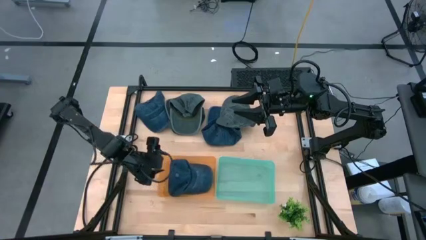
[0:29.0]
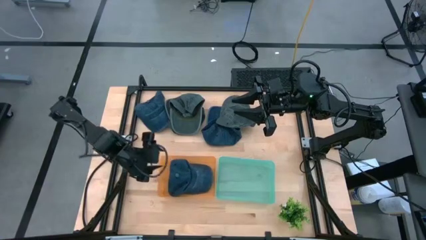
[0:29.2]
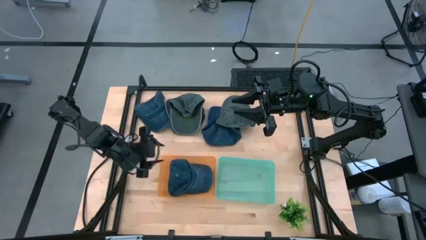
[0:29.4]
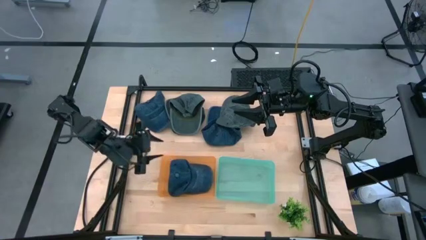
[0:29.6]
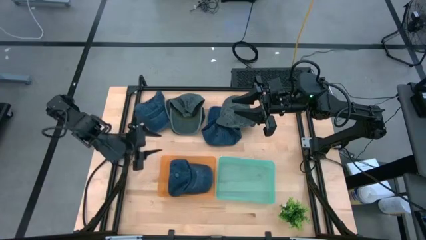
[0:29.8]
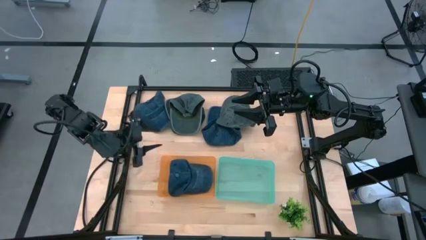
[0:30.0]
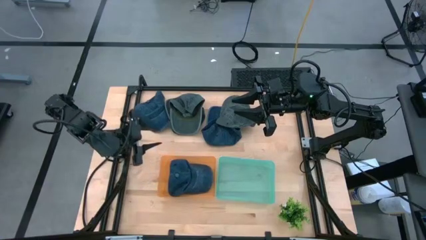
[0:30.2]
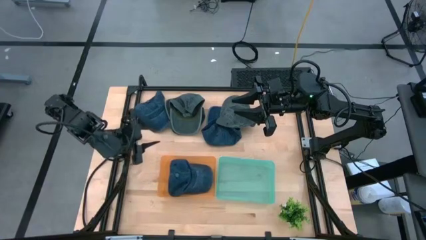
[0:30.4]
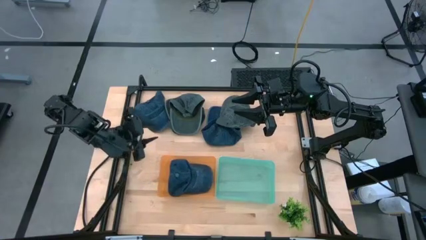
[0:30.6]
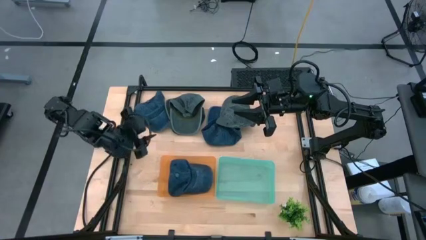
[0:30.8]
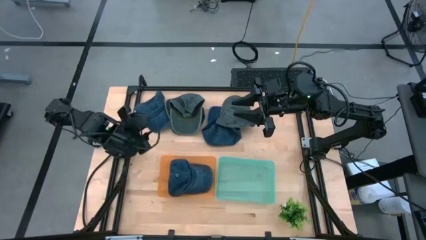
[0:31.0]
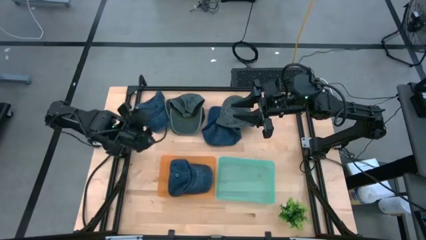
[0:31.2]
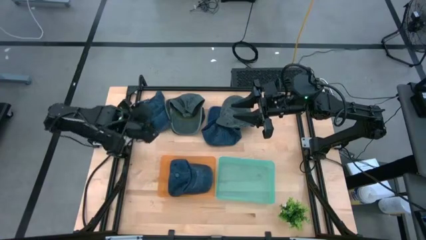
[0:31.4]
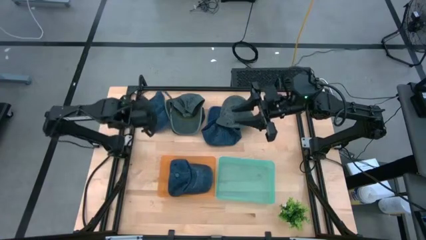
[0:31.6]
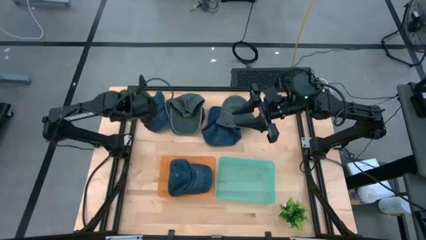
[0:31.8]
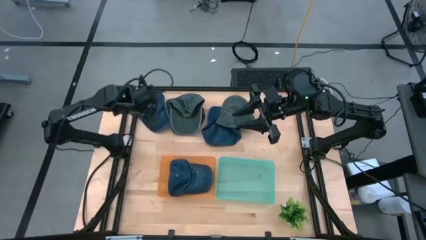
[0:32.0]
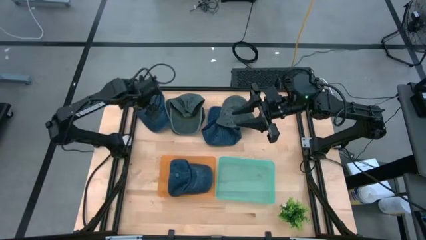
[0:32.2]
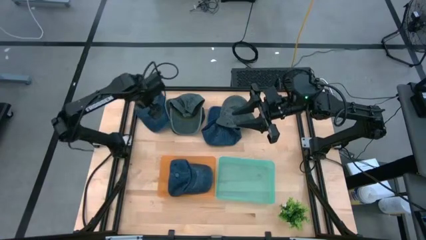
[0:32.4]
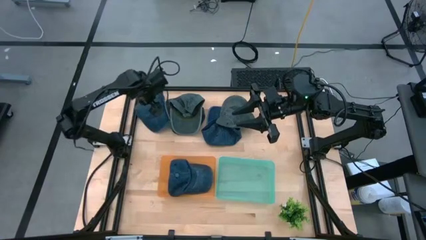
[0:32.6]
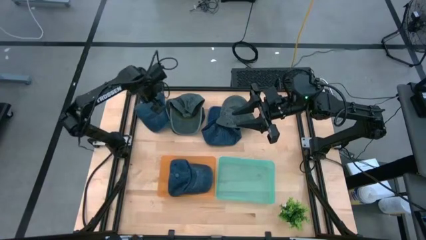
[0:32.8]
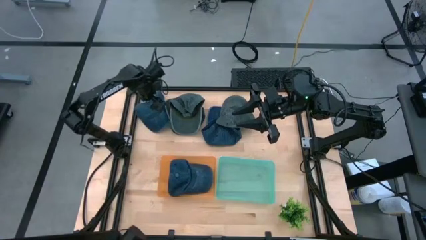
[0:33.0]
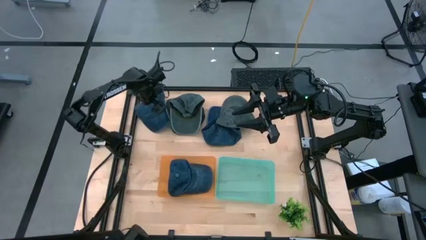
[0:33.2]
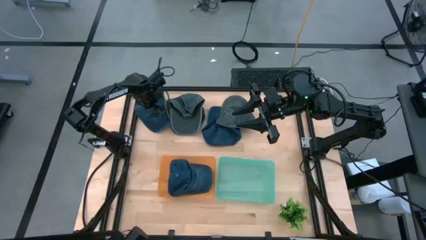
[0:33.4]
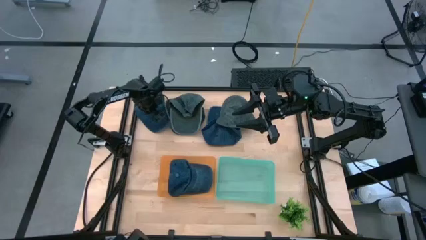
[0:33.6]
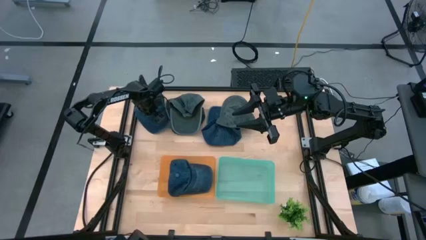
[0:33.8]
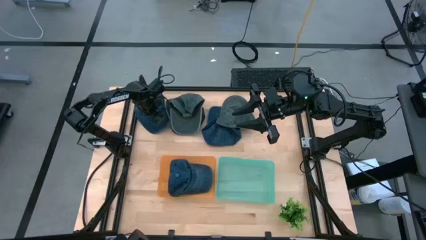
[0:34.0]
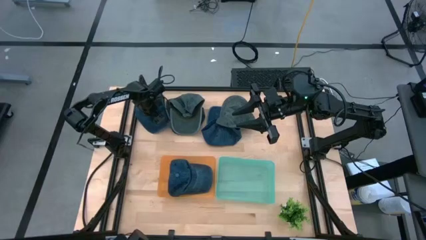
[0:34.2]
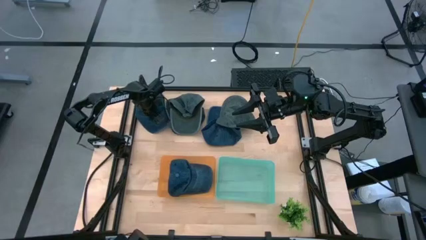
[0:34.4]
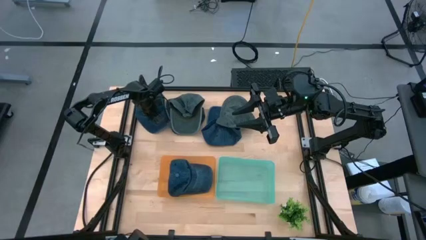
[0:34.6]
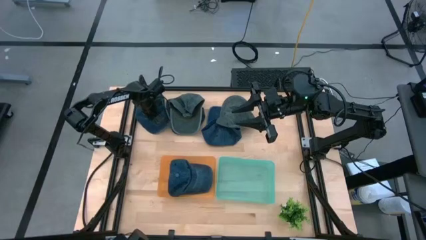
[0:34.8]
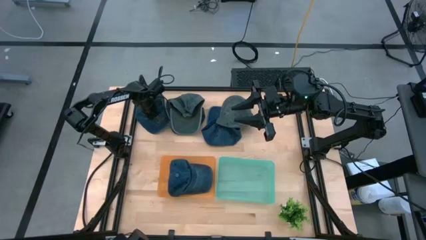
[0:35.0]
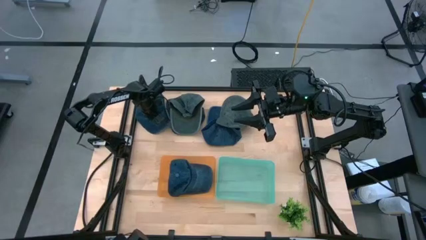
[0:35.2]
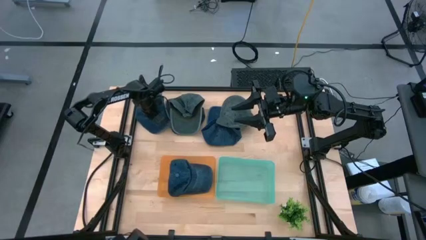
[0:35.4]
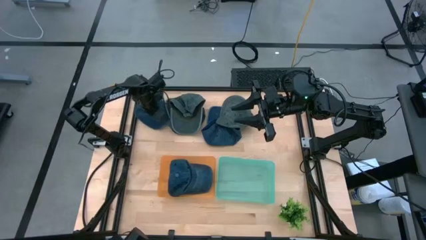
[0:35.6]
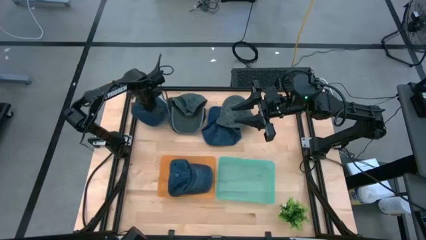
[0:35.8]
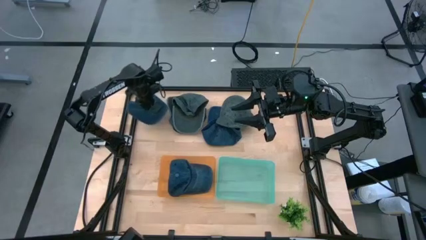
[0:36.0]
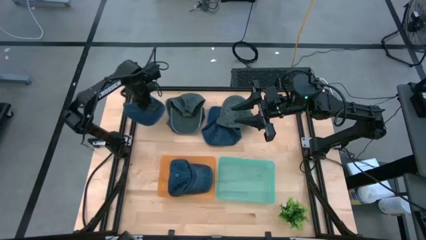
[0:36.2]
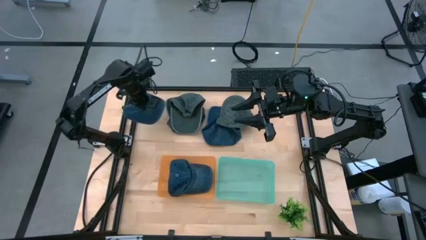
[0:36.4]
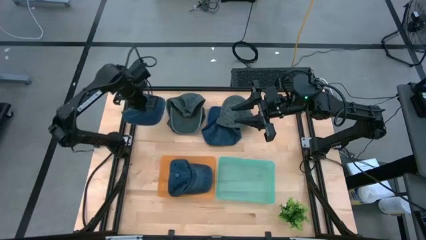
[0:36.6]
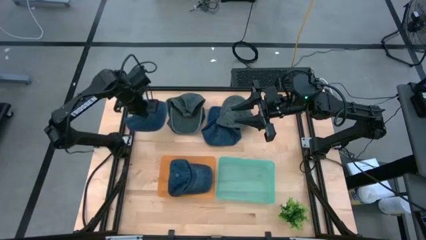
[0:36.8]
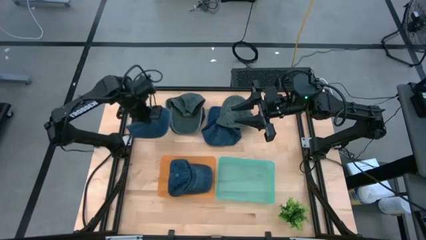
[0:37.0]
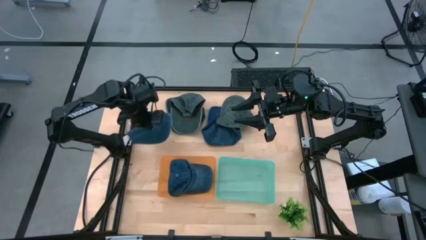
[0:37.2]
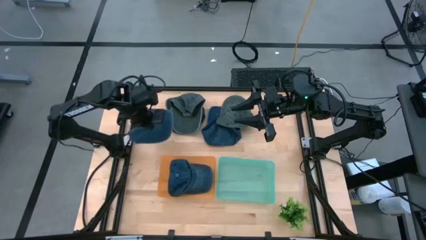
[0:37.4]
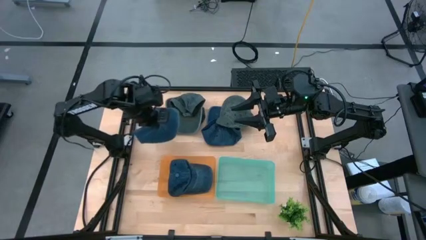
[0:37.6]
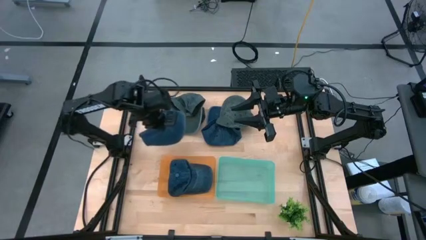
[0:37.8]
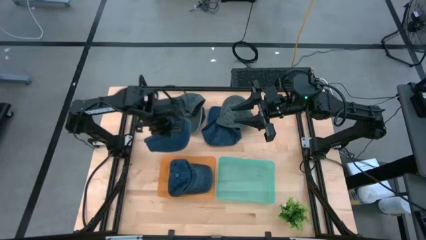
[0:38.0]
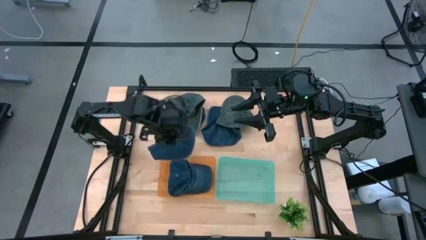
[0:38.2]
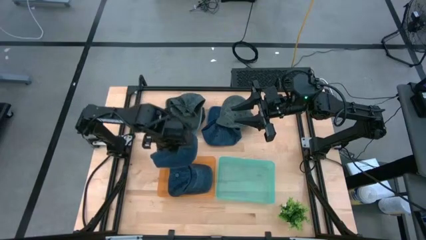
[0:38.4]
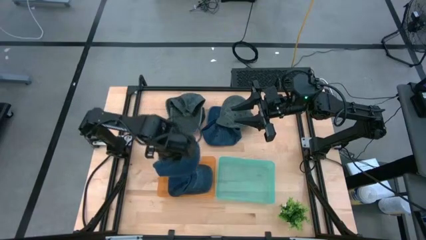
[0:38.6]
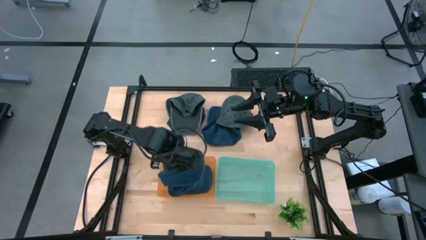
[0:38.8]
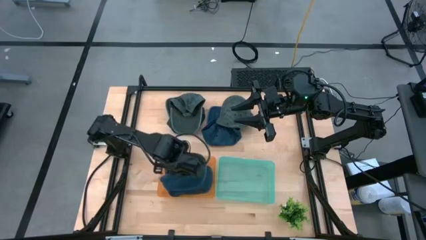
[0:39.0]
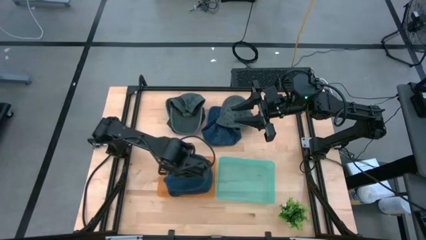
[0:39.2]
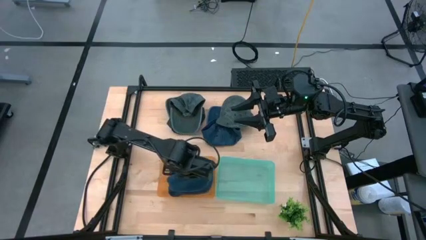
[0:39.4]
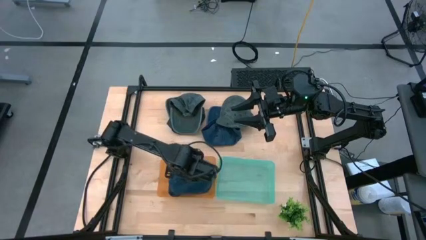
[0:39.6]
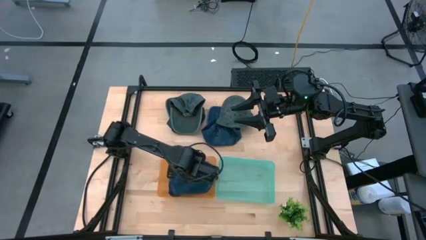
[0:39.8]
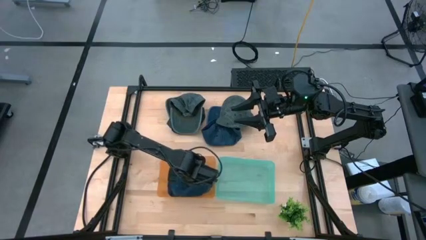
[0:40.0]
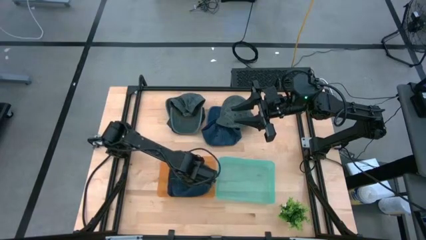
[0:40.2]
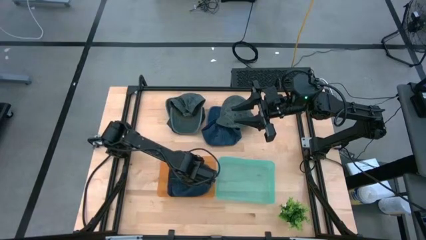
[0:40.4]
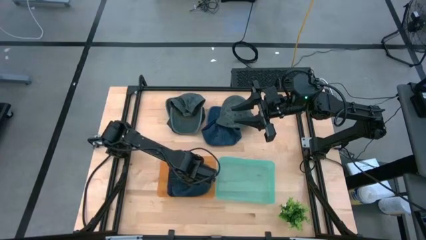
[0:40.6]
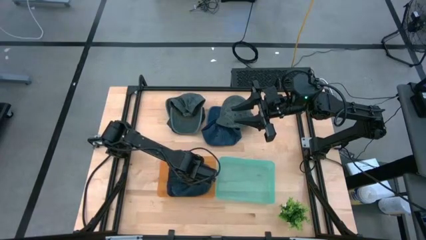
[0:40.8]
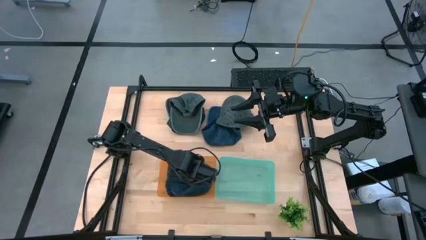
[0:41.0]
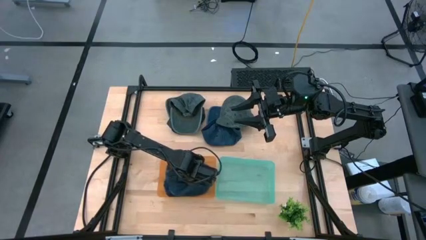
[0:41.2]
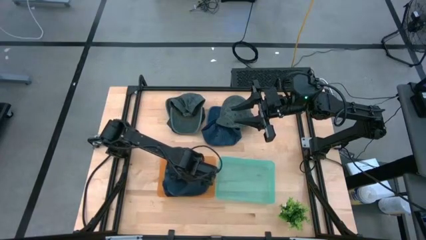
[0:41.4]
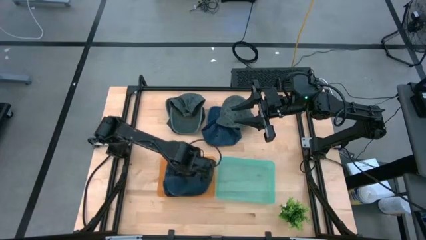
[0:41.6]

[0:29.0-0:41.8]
Task: Pick & Place hat
Put the left blue cap into the orange bin
